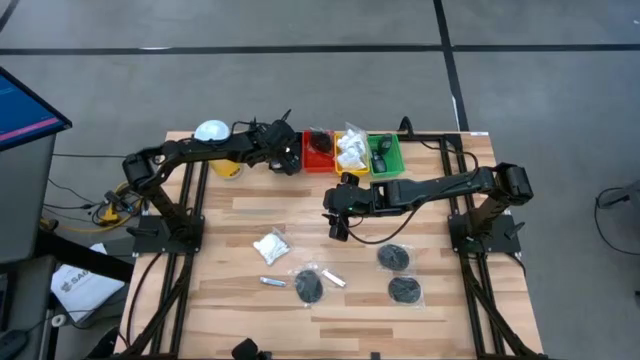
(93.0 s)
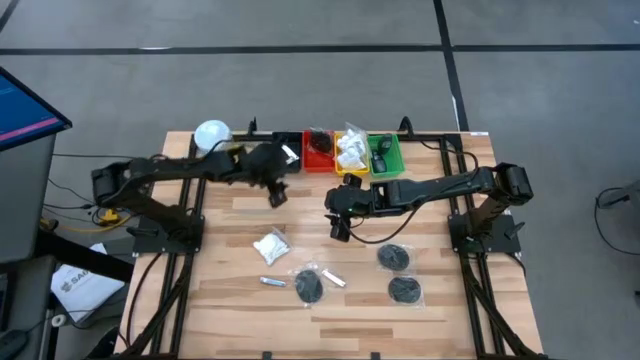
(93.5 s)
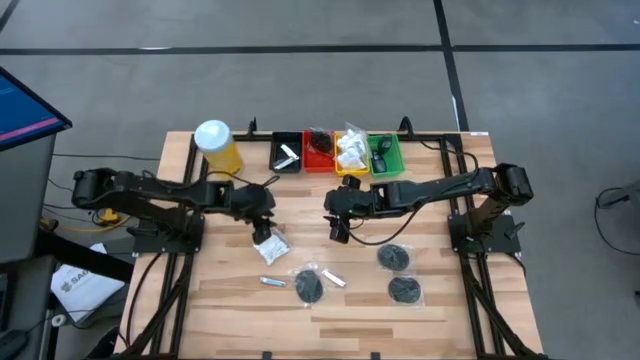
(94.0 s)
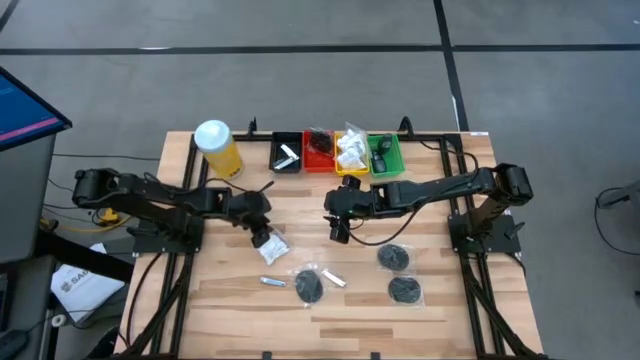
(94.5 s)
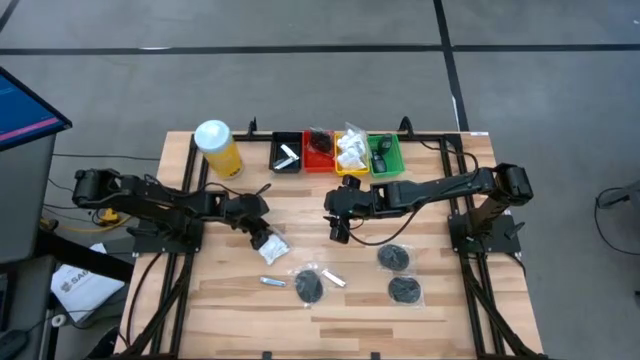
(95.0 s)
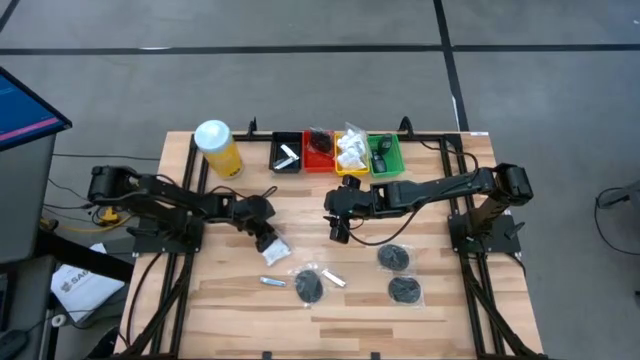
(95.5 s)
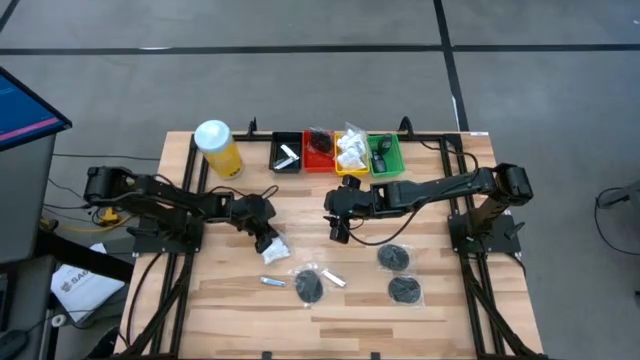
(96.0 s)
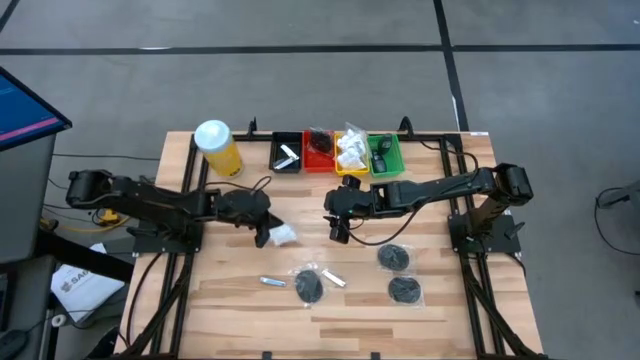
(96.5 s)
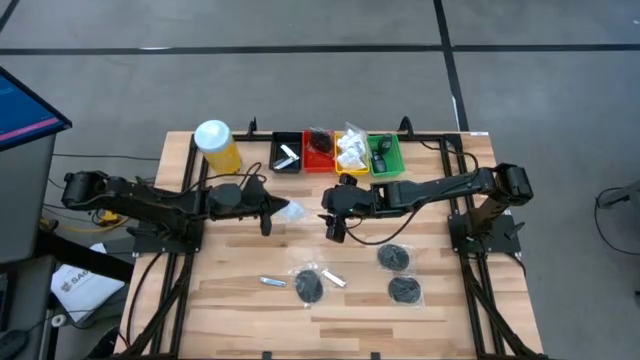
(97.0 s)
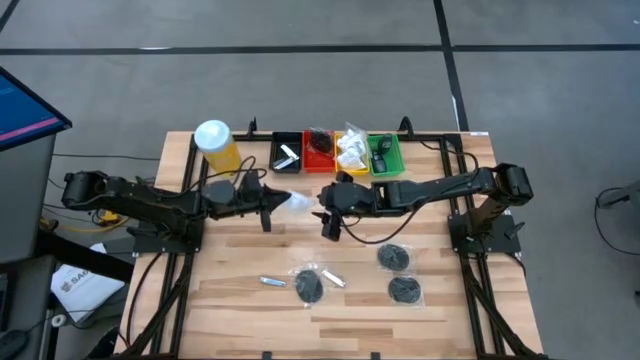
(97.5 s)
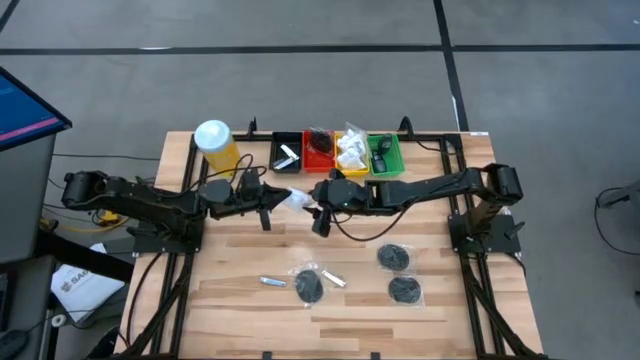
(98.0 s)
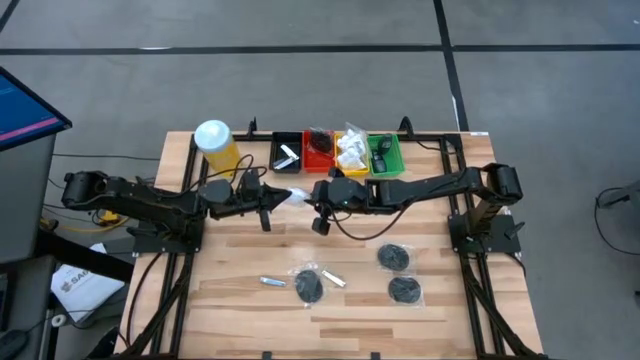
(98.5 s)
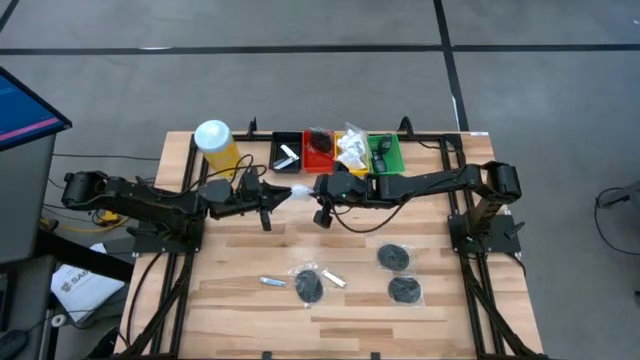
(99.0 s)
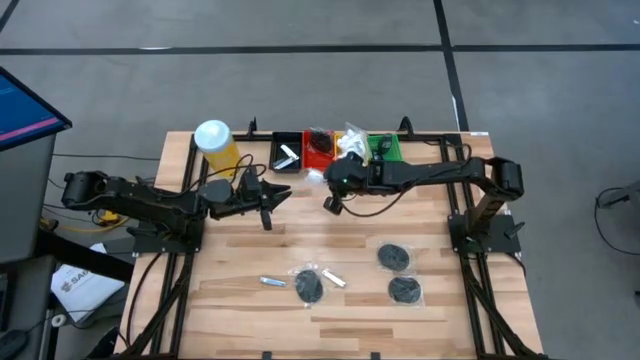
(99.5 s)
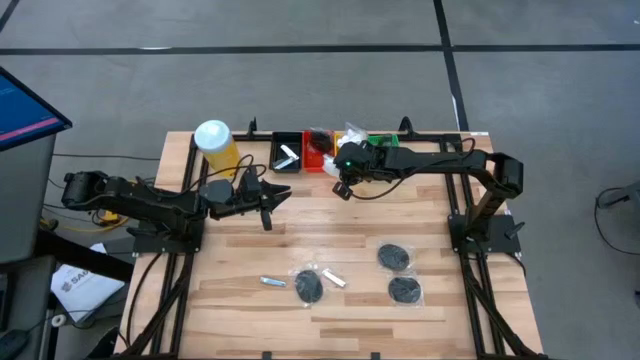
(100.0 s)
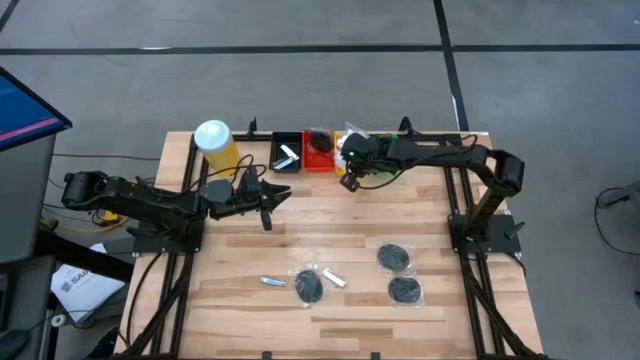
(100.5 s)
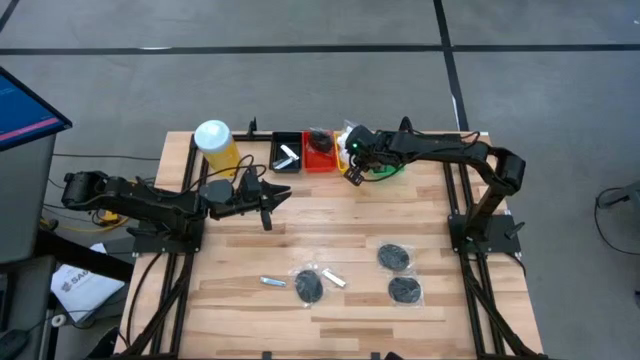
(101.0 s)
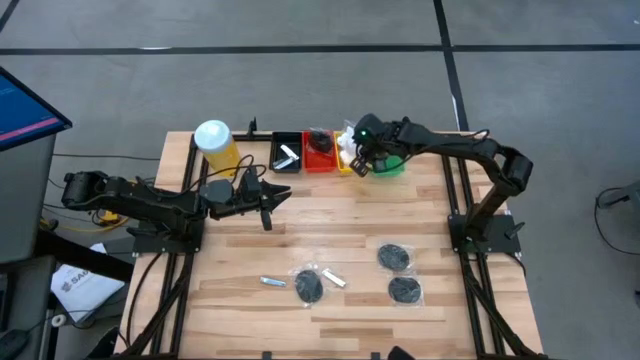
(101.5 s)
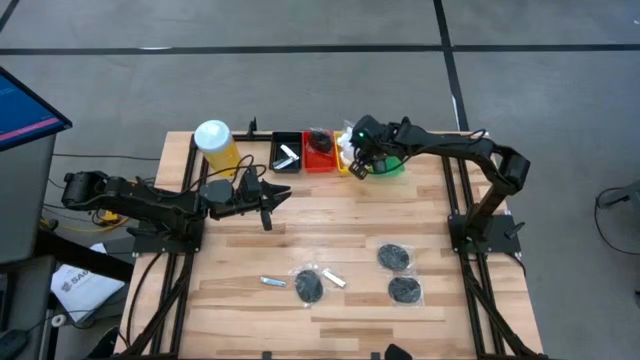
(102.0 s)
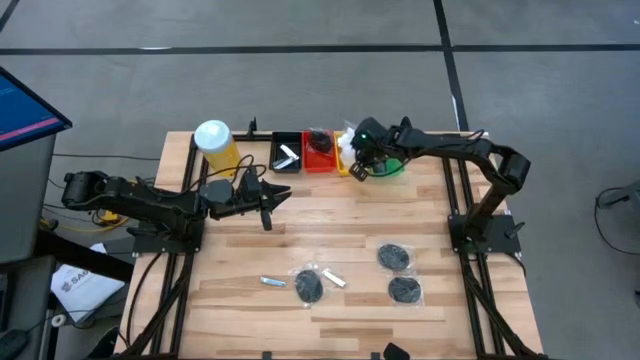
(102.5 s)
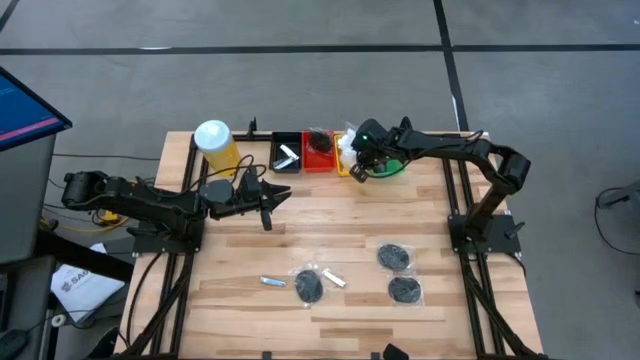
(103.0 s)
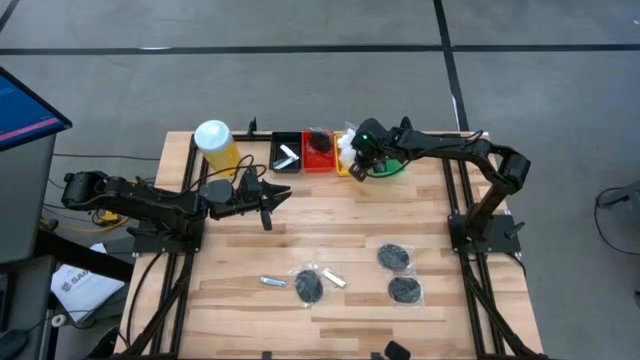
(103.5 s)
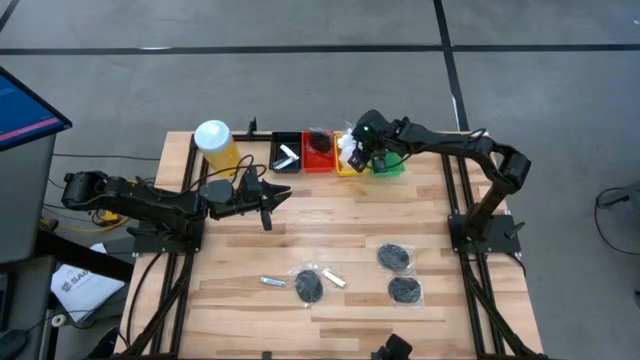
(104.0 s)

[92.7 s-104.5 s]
Task: Pick & Place Travel size toiletries
Put the cotton pack into the yellow bin

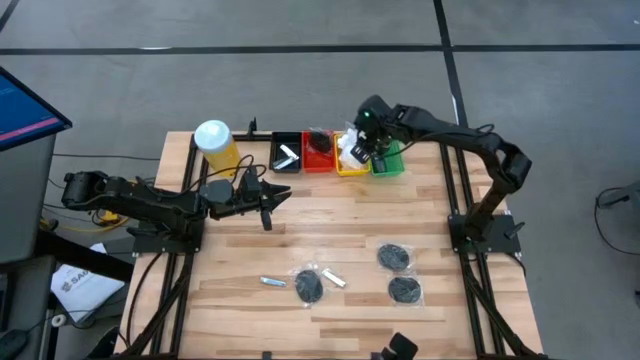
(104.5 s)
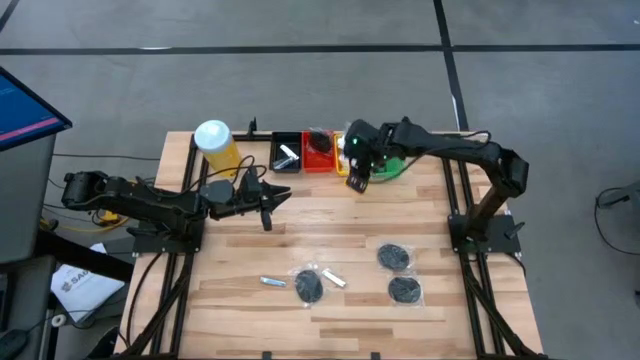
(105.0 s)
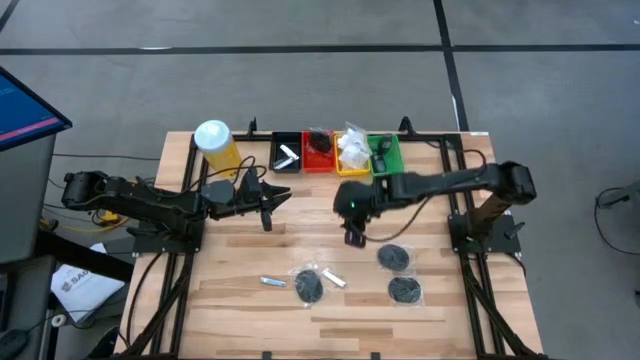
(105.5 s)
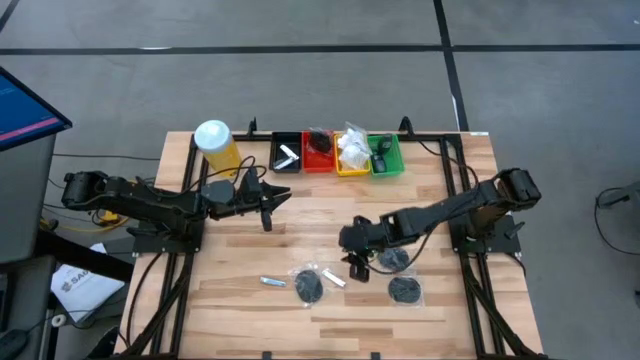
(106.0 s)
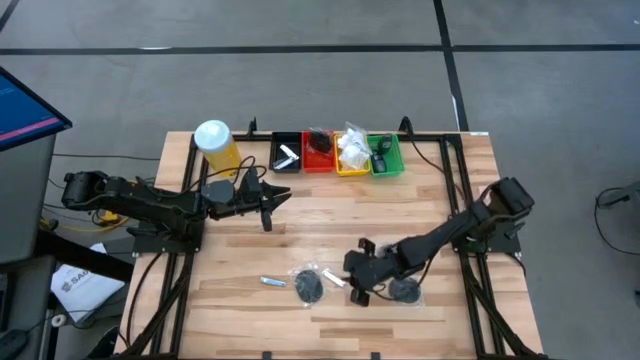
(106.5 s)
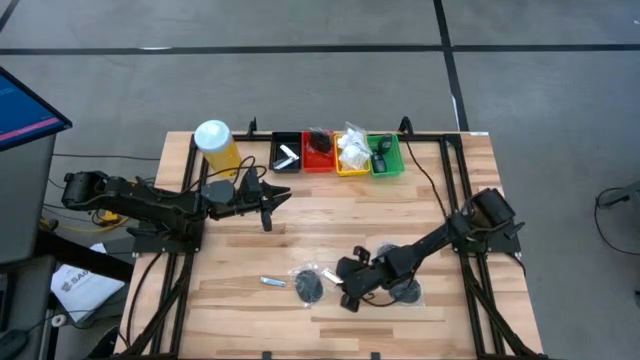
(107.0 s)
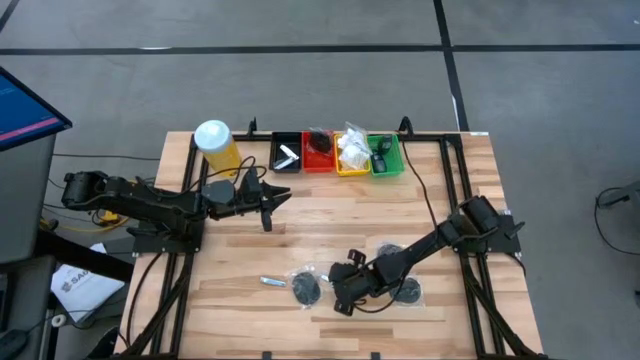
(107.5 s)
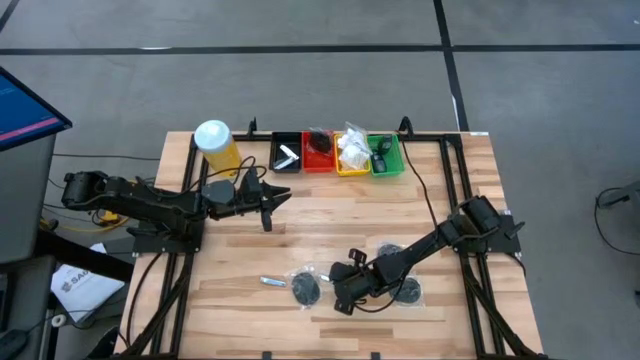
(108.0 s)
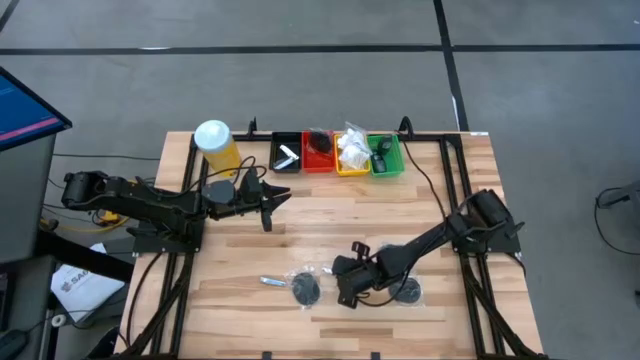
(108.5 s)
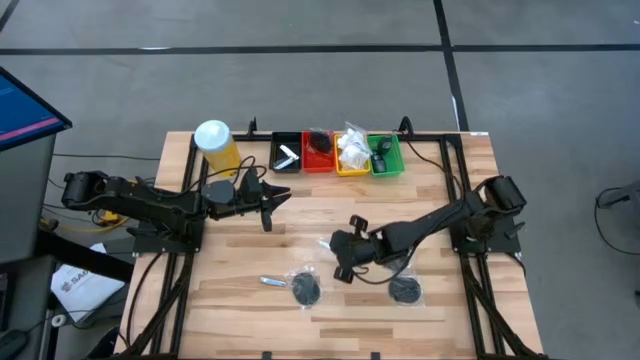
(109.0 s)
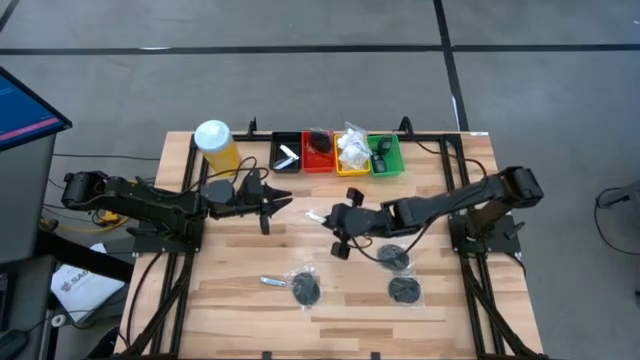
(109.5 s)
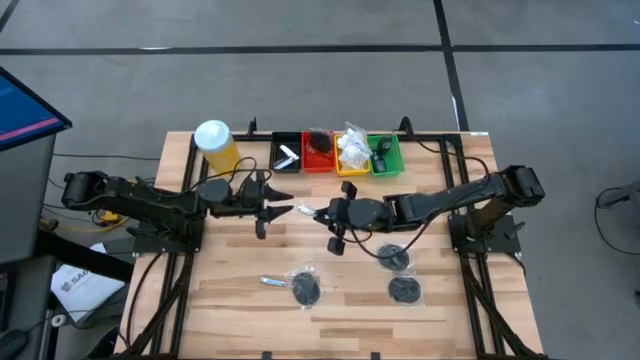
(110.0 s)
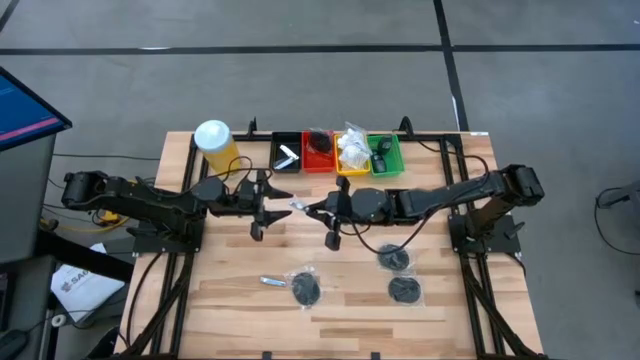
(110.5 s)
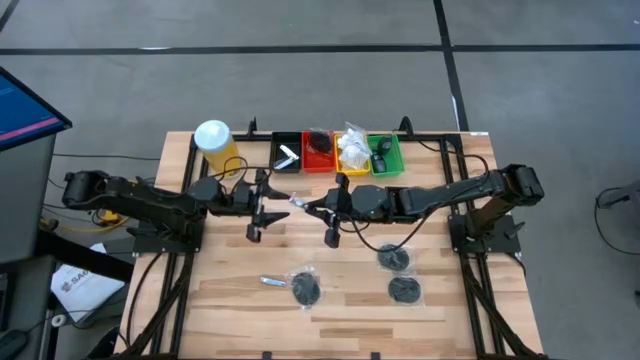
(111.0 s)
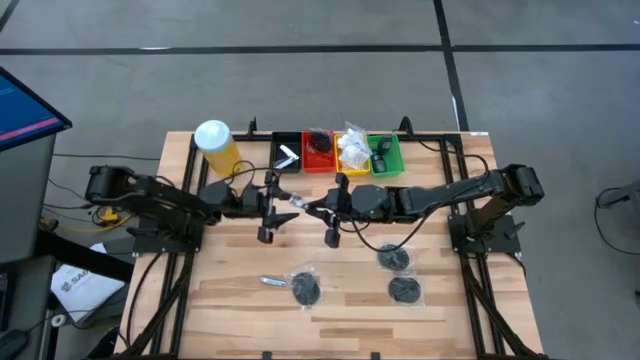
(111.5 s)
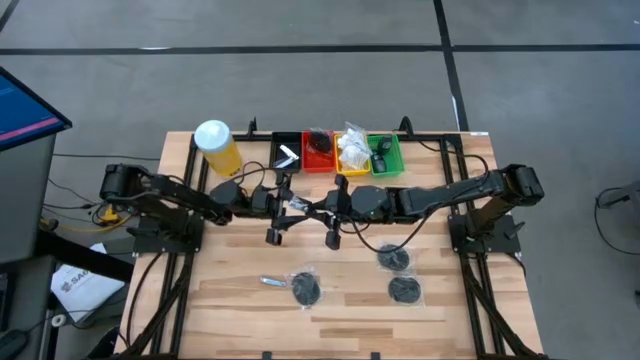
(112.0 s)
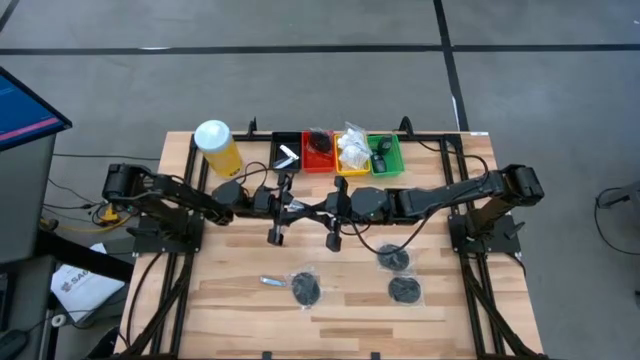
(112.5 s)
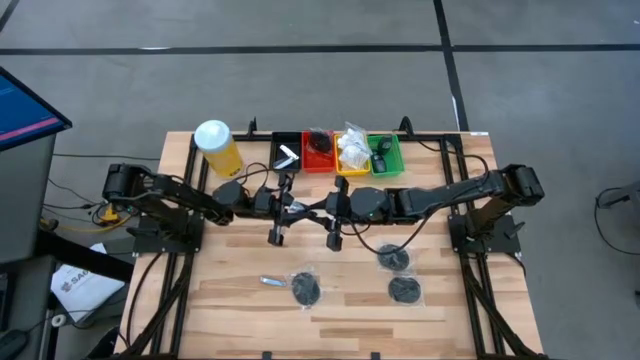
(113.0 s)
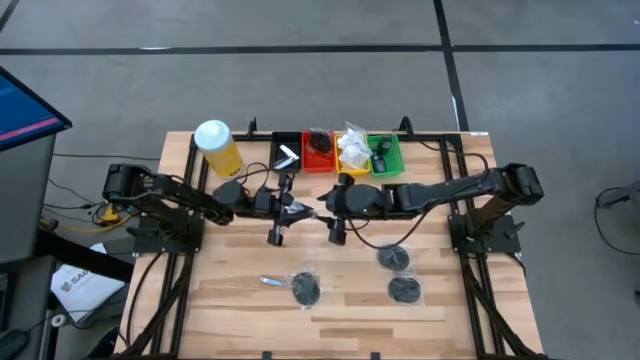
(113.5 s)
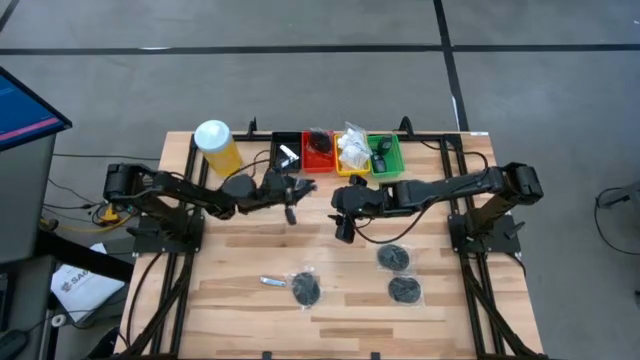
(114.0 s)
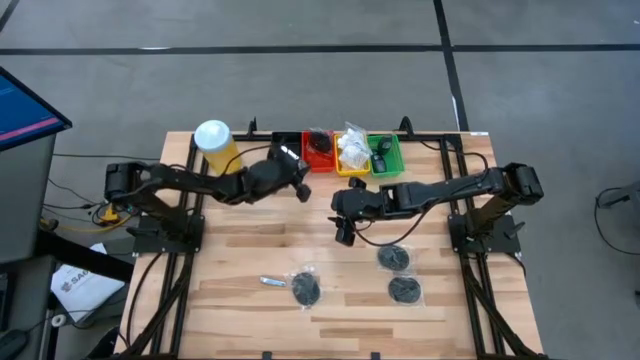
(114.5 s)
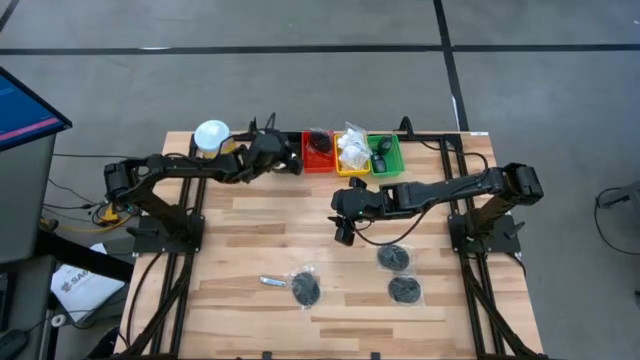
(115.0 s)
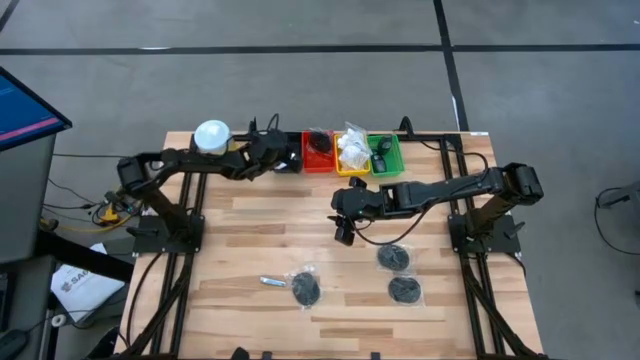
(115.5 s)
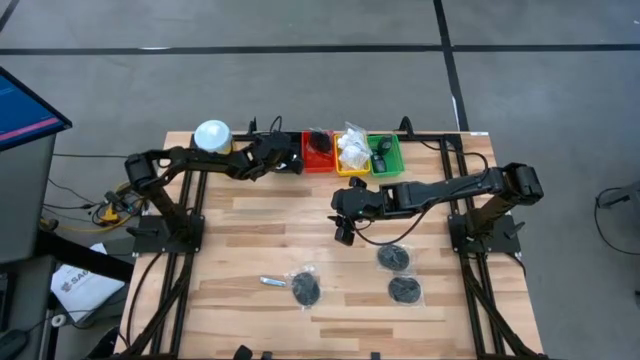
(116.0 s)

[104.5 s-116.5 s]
Put the nail cutter into the black bin
